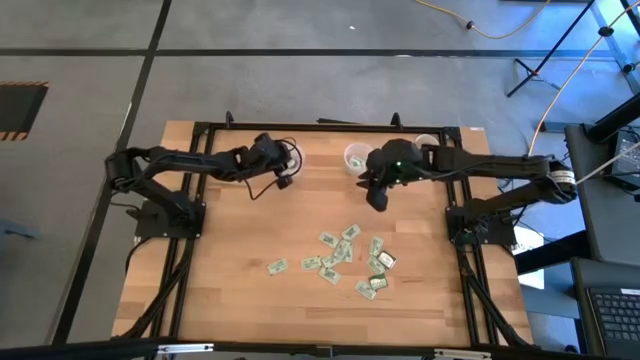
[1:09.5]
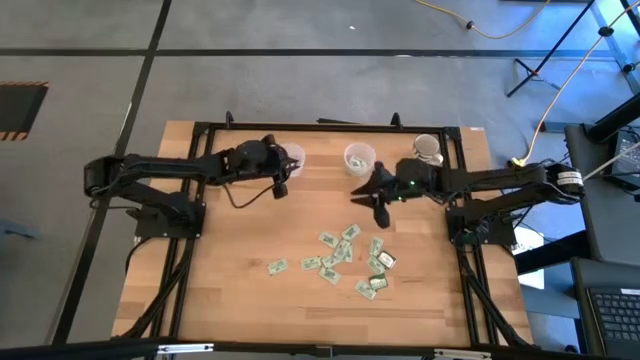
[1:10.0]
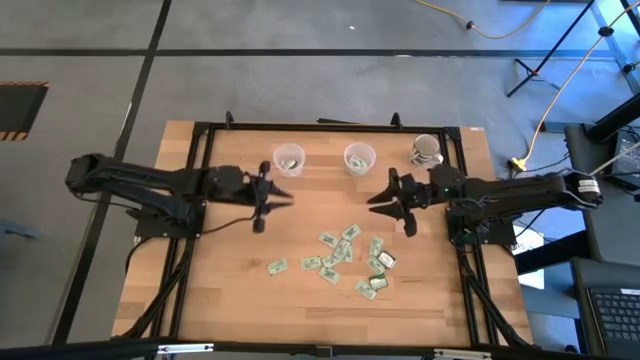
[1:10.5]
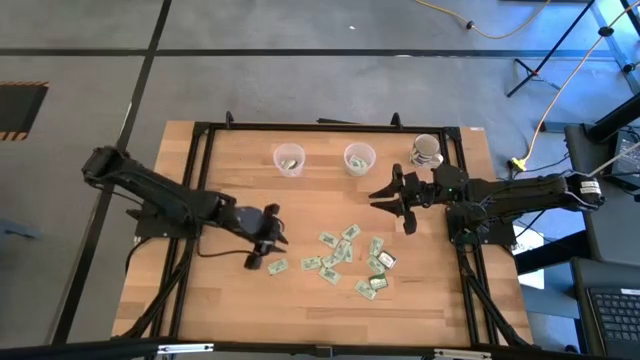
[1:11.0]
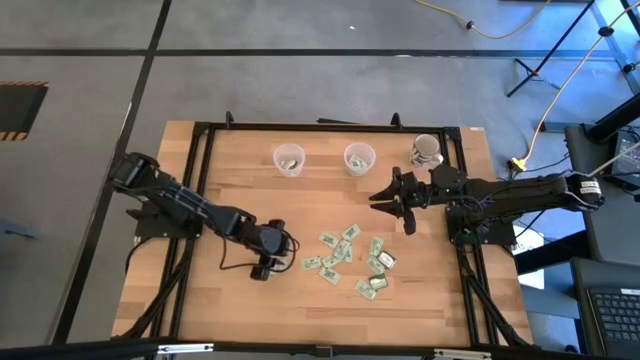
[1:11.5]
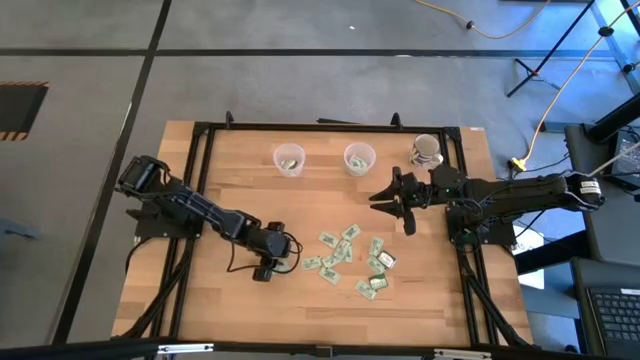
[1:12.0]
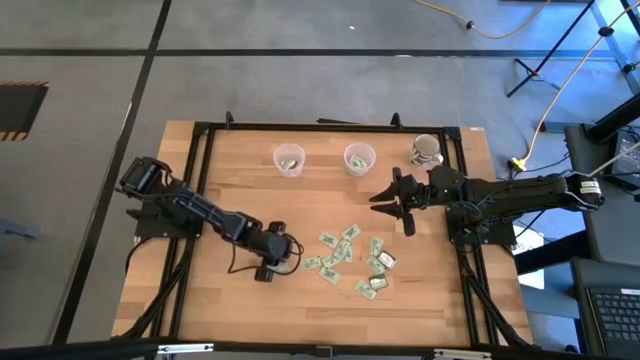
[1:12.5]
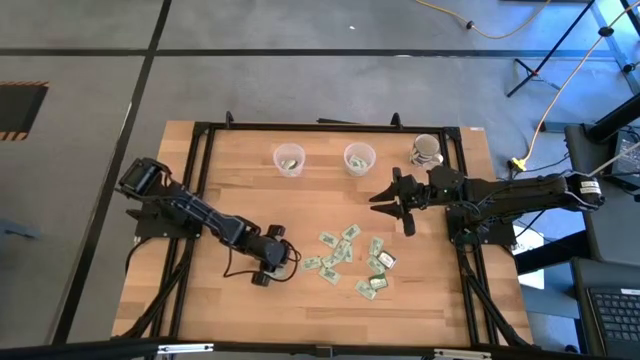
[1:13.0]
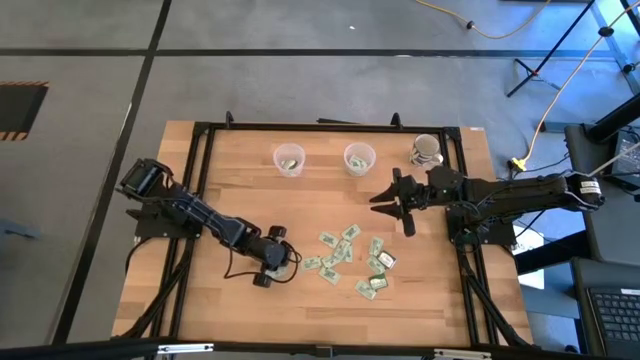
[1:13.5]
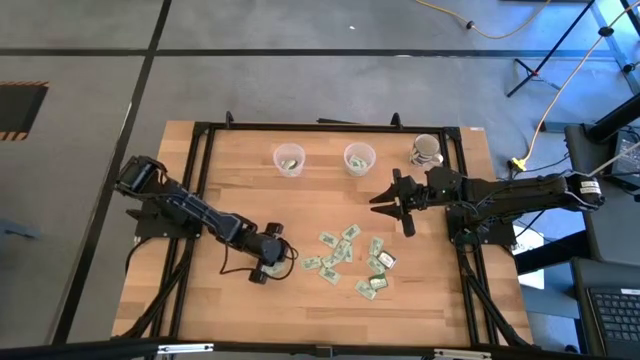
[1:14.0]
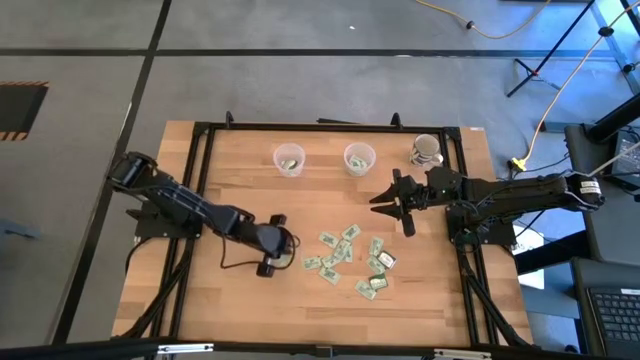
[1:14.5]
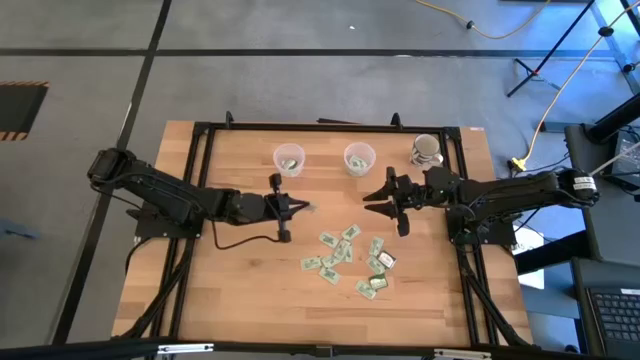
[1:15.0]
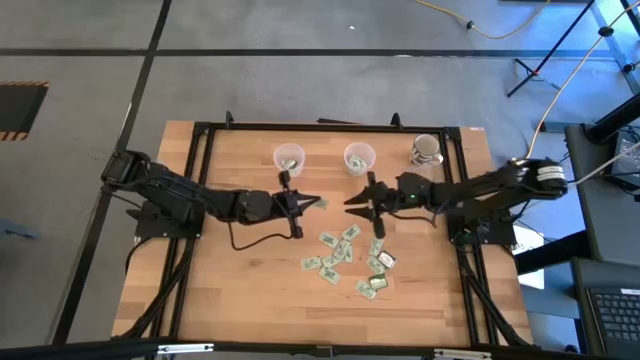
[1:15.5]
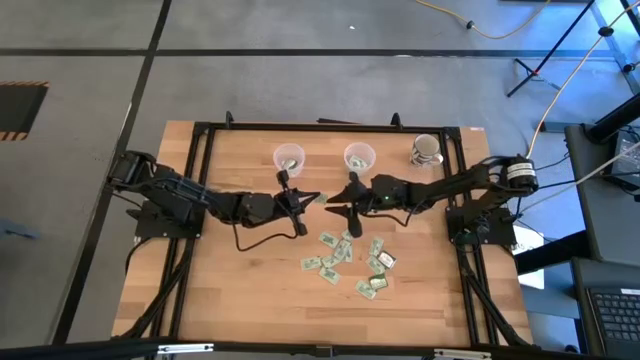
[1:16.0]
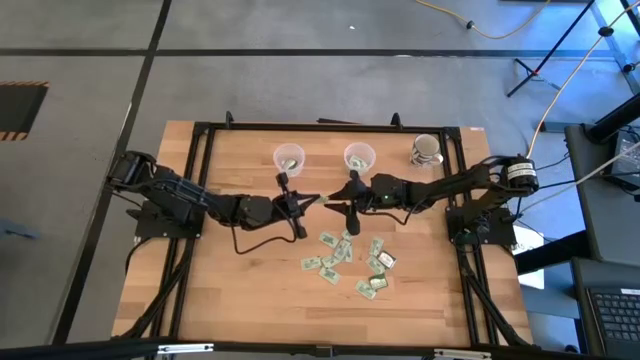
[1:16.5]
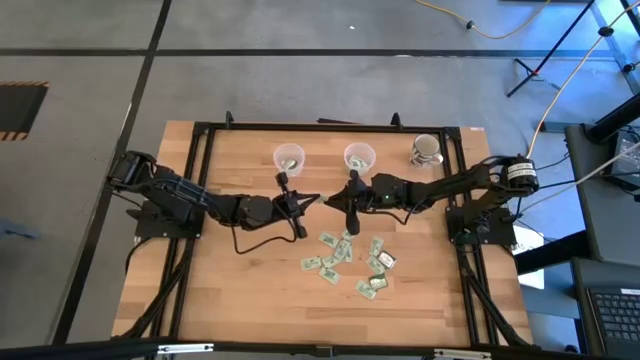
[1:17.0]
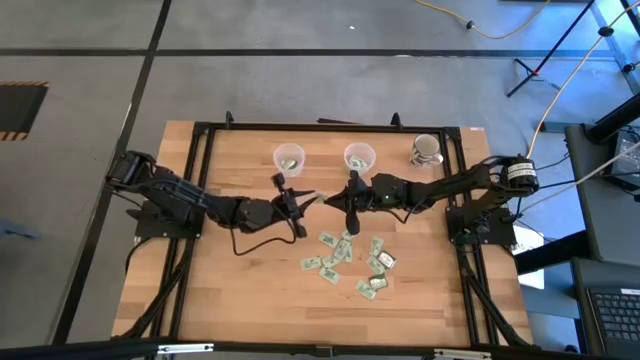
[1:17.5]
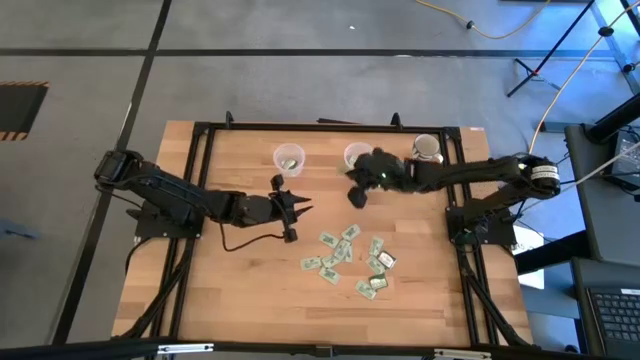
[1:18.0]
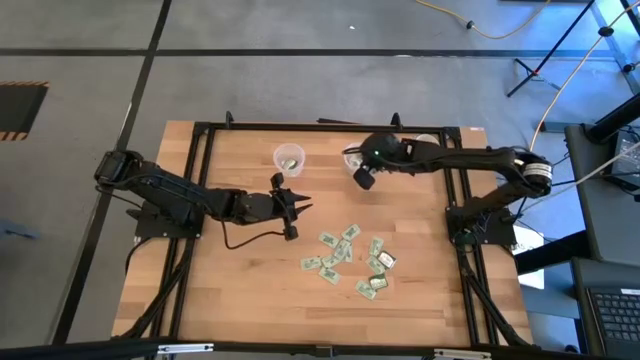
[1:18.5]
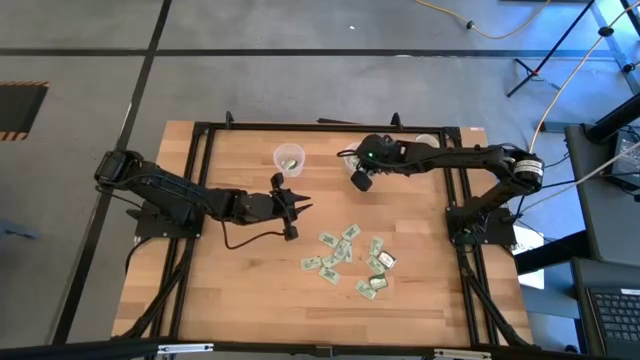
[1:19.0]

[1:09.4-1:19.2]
Task: Pick and place Stevia / Truvia into bins
Put the stevia packet into the right transparent container

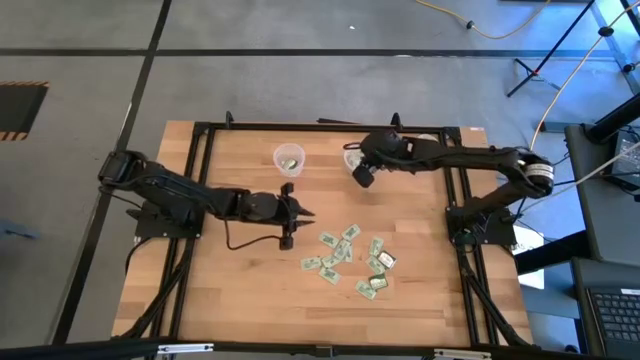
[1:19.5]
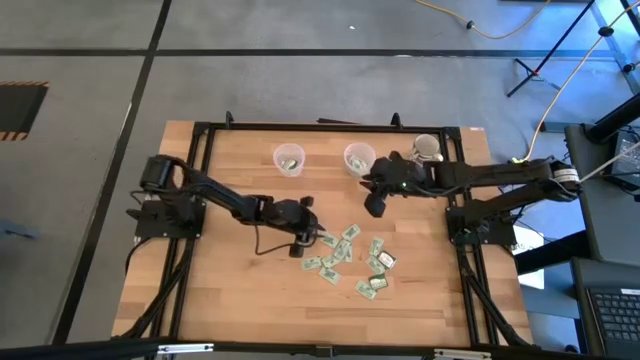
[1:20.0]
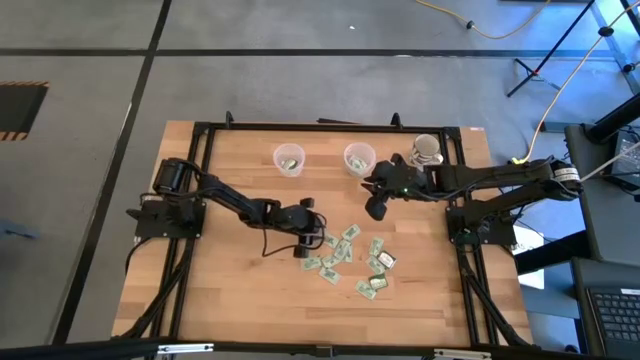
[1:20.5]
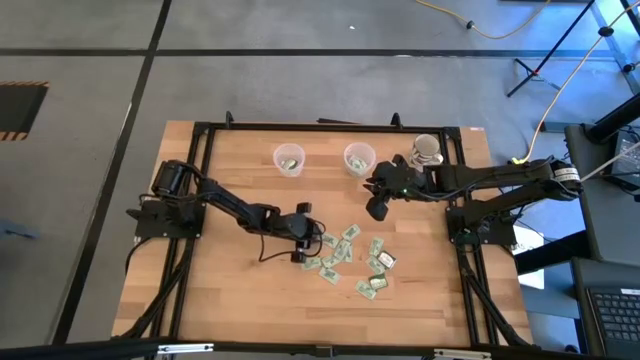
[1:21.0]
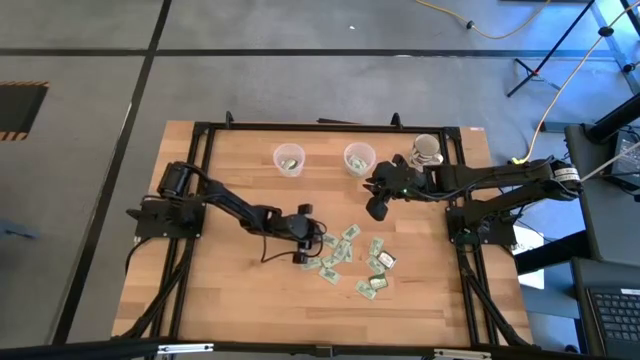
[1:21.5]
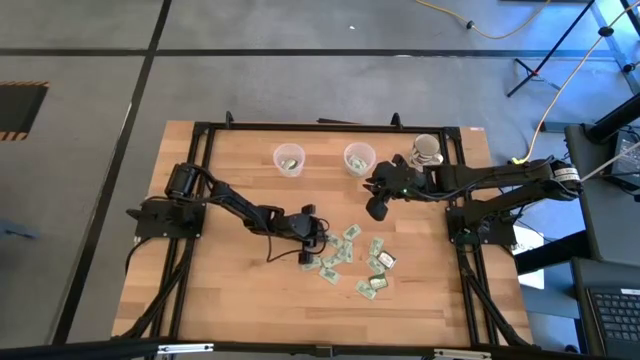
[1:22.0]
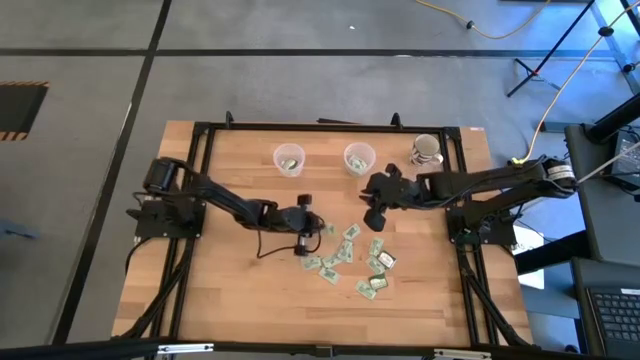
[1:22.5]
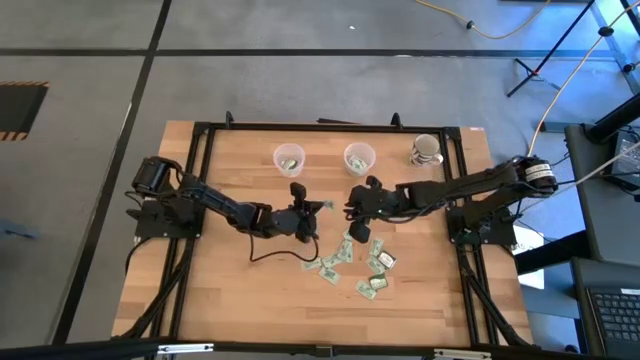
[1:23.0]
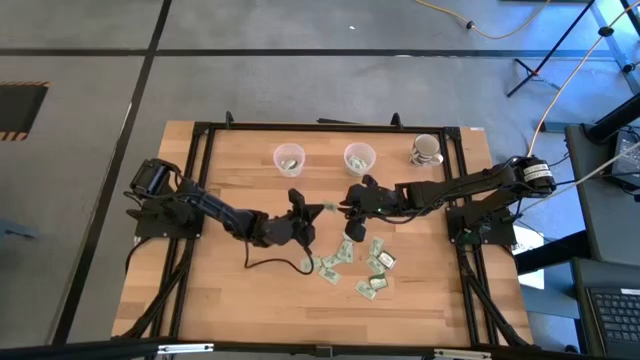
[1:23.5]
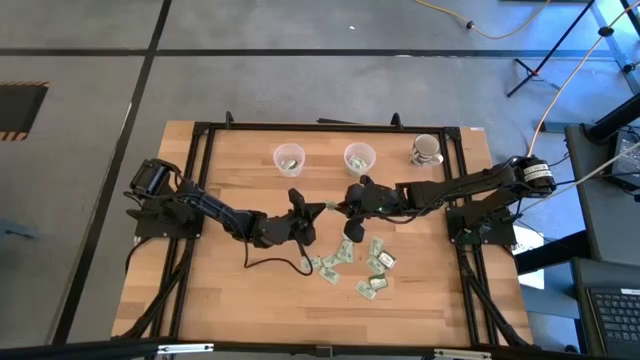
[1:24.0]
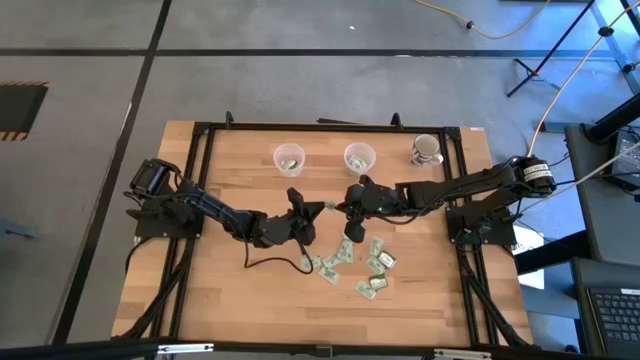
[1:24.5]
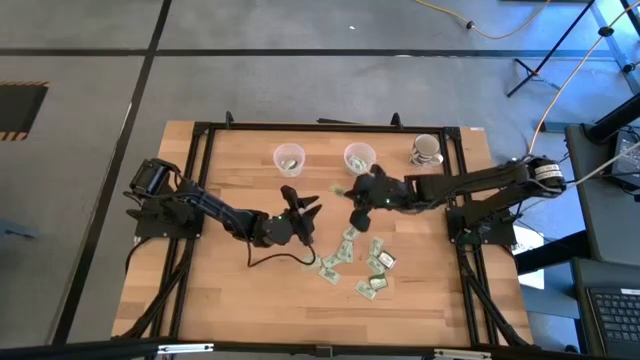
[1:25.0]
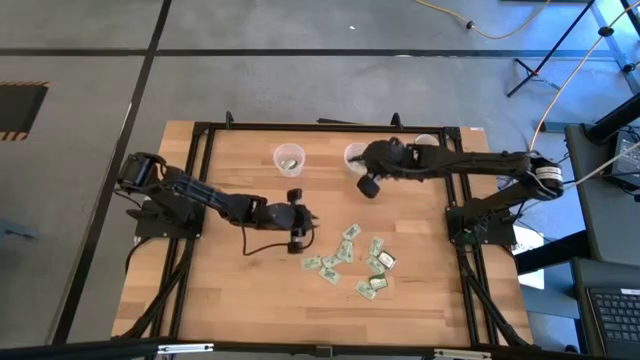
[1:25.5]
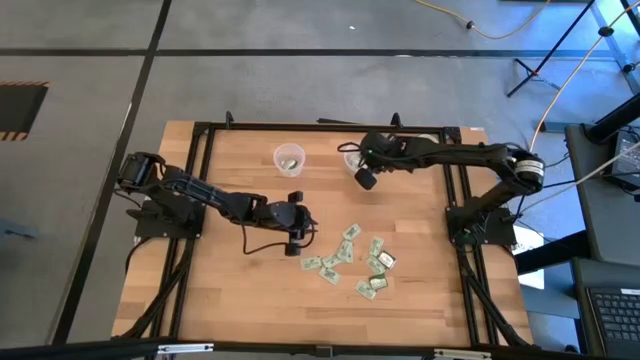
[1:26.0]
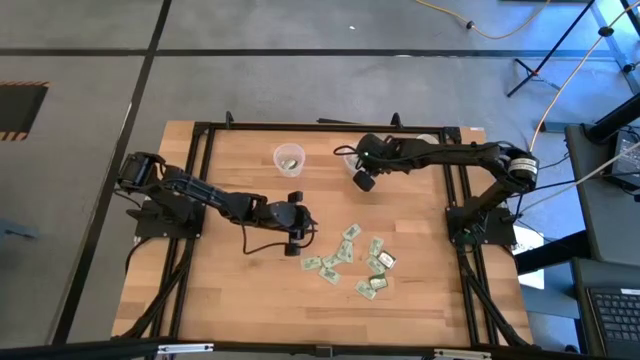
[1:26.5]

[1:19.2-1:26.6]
Put the stevia packet into the right transparent container

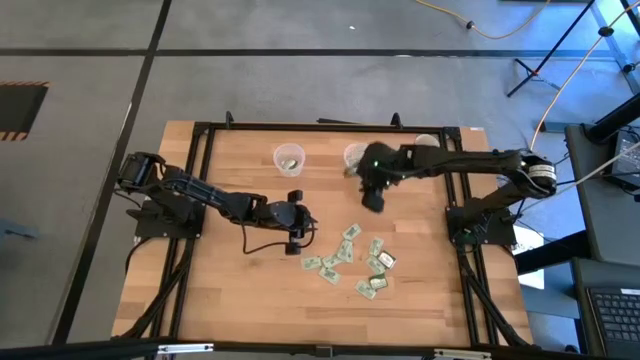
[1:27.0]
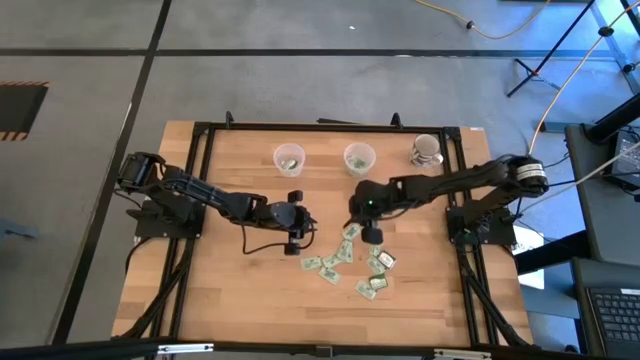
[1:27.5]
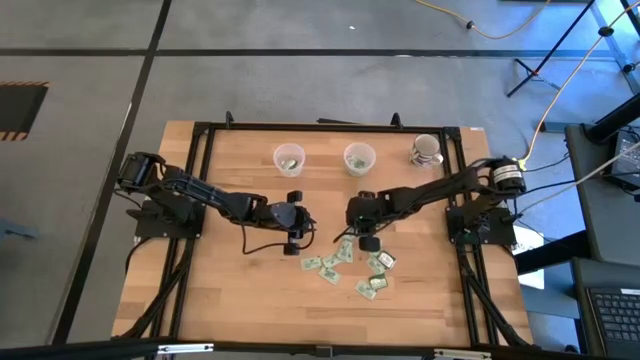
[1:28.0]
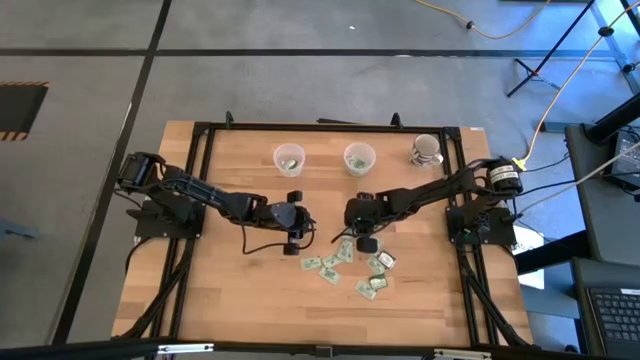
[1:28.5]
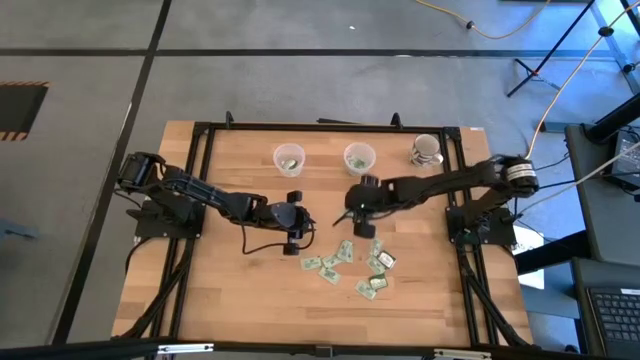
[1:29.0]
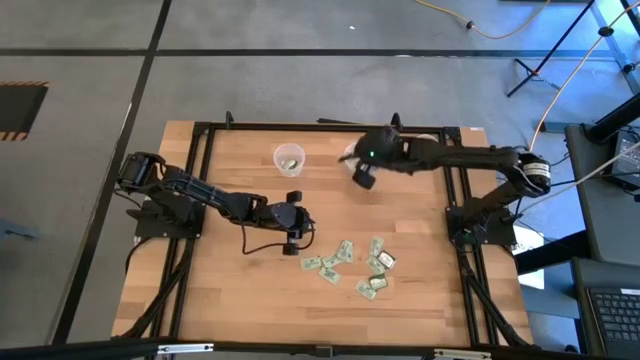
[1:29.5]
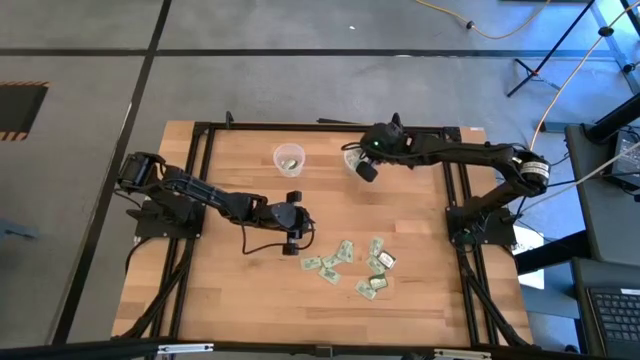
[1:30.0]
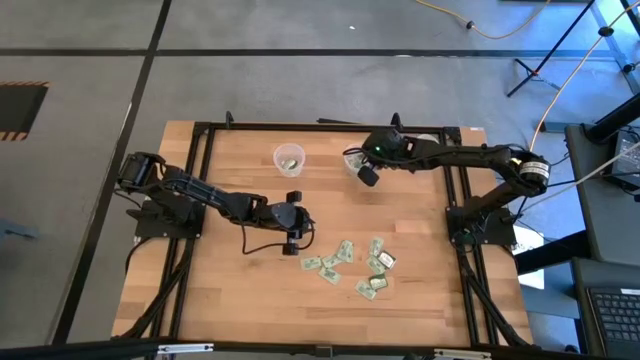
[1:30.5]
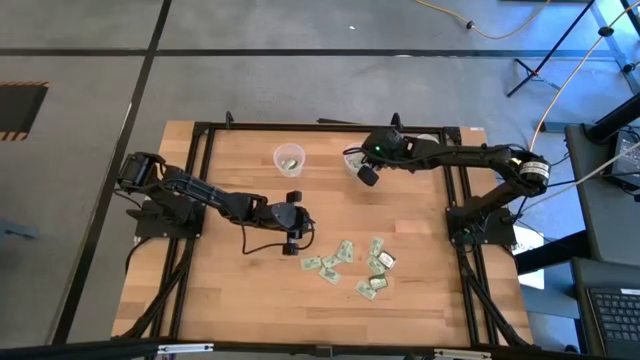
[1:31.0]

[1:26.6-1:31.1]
Put the stevia packet into the right transparent container

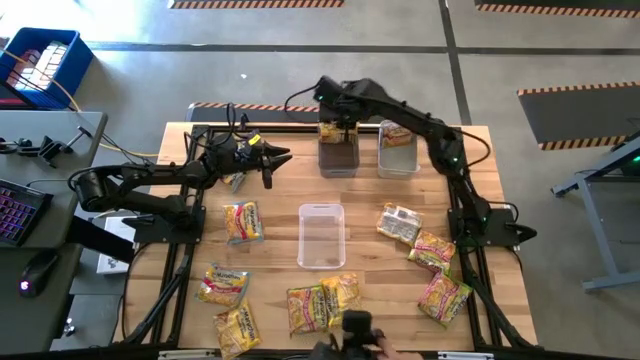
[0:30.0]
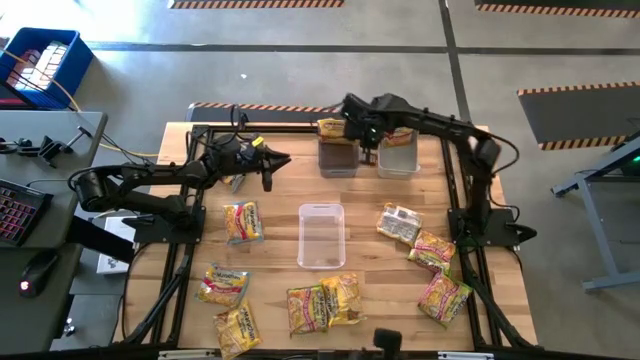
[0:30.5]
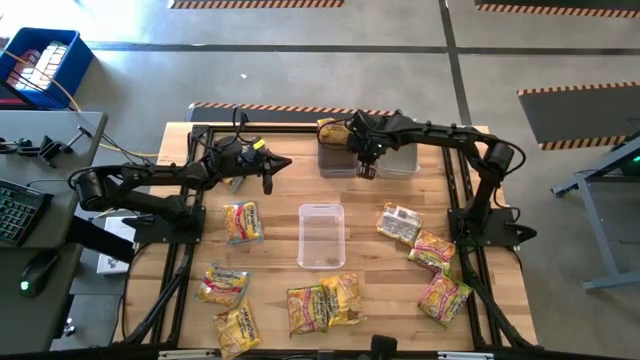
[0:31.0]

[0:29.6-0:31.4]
Task: Sort Maruchan noodles
Adjust the black bin
